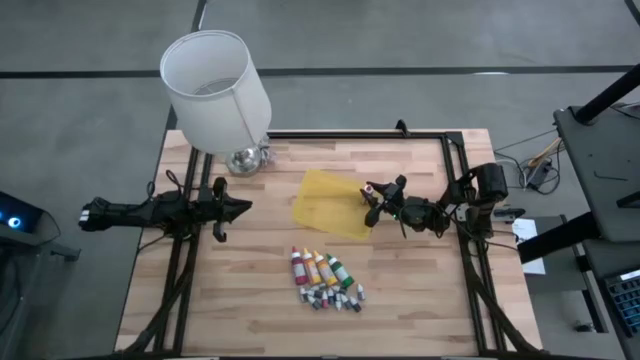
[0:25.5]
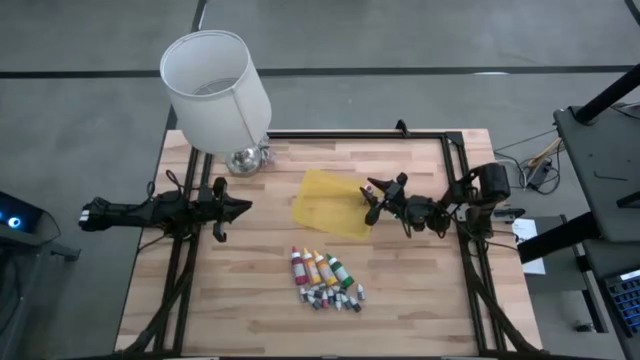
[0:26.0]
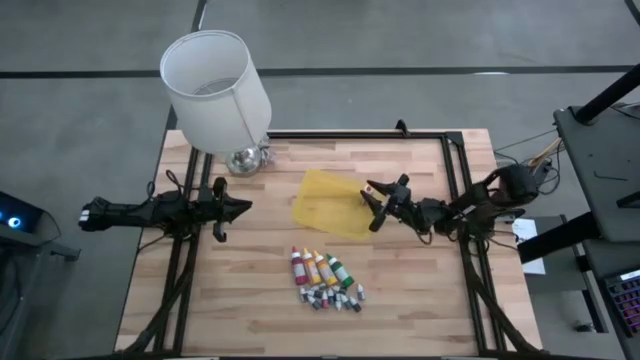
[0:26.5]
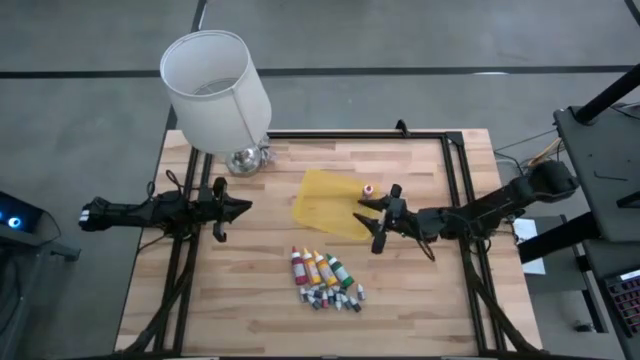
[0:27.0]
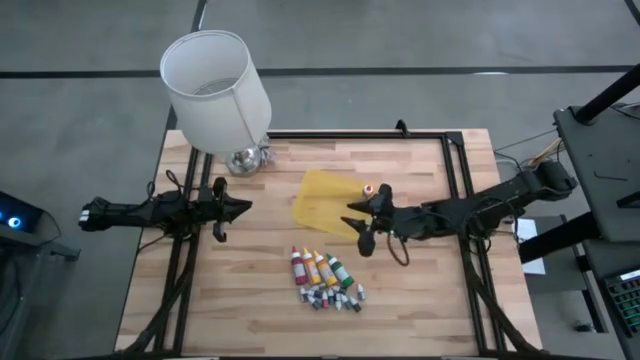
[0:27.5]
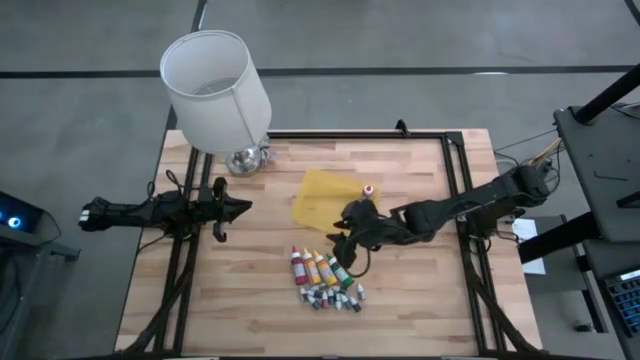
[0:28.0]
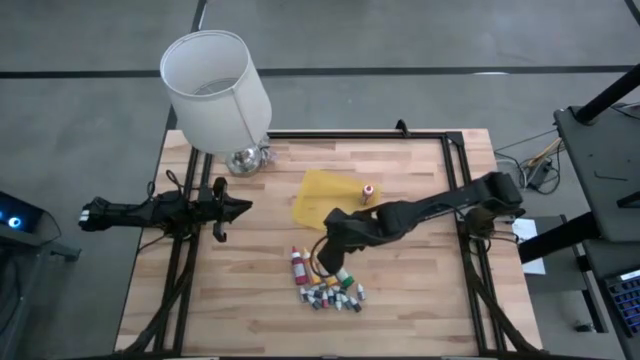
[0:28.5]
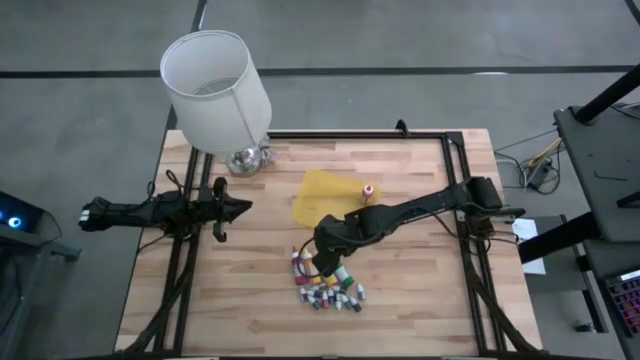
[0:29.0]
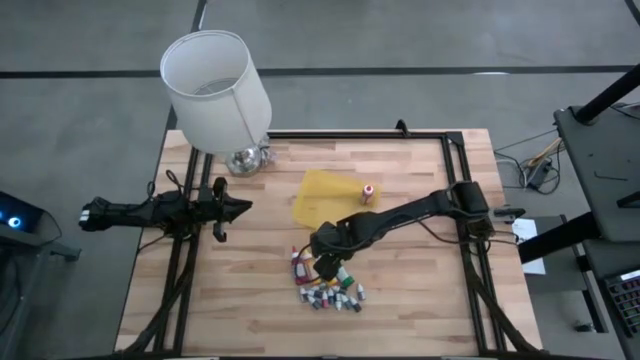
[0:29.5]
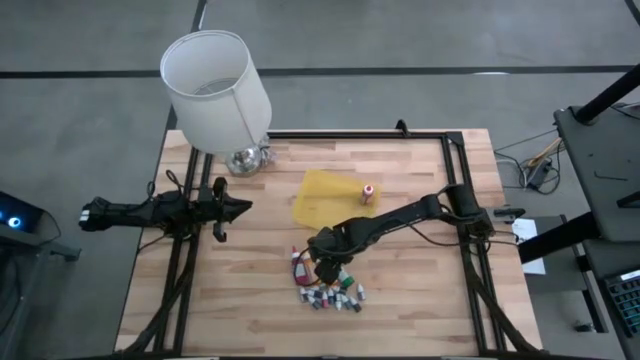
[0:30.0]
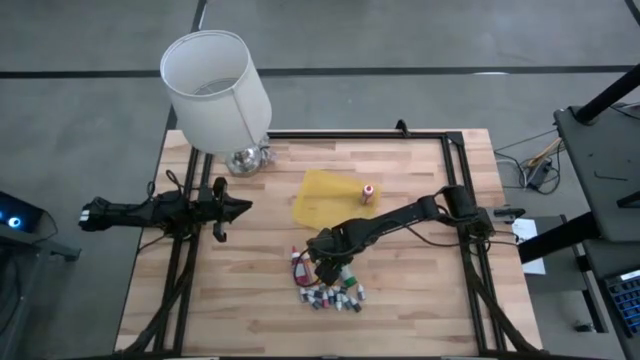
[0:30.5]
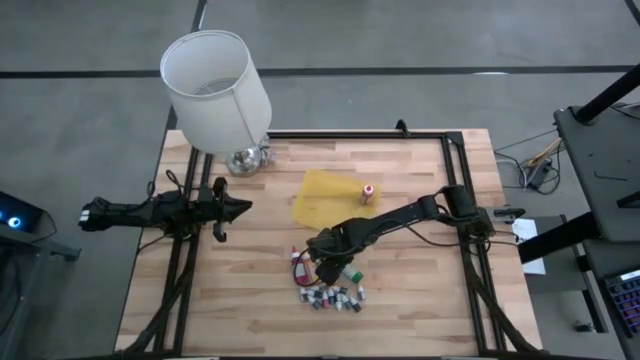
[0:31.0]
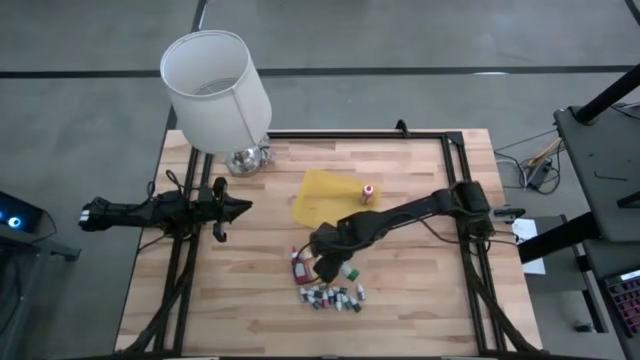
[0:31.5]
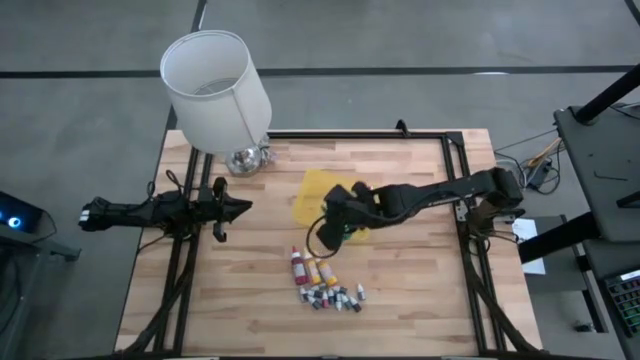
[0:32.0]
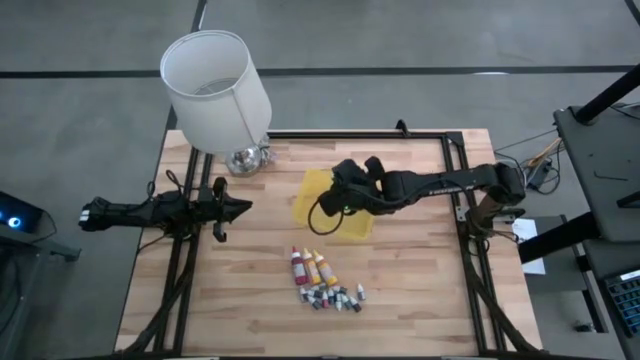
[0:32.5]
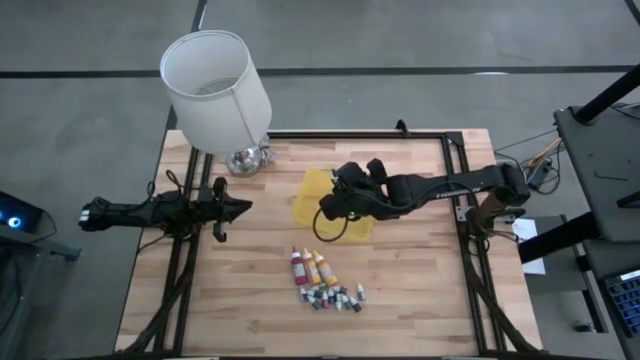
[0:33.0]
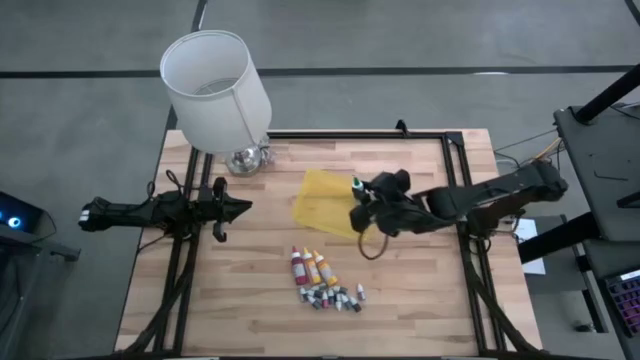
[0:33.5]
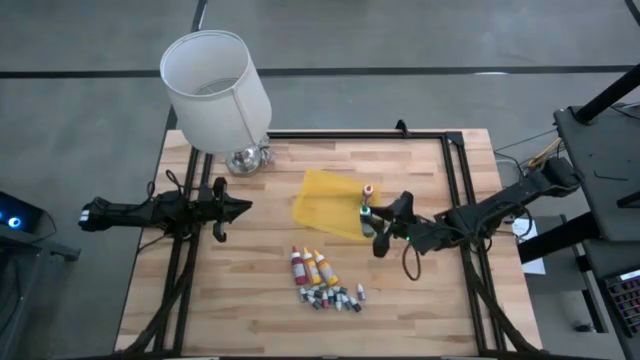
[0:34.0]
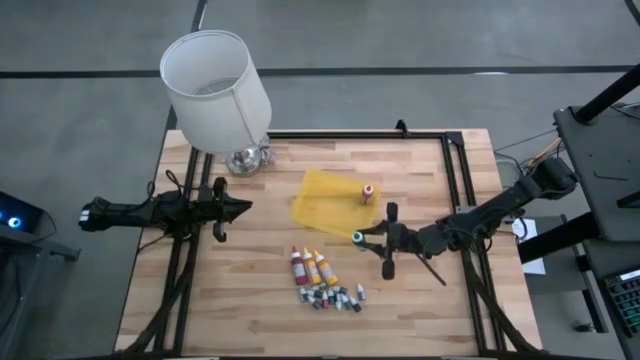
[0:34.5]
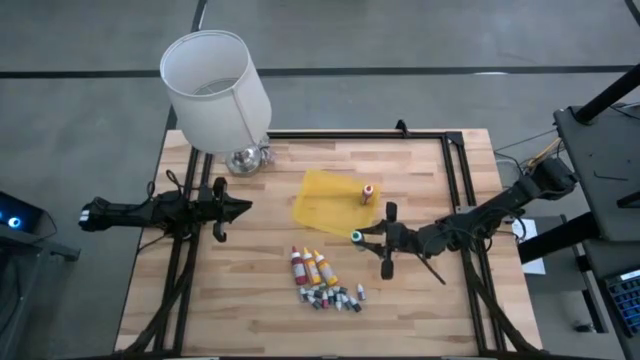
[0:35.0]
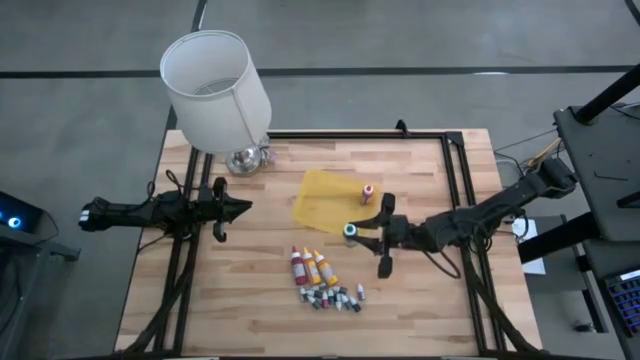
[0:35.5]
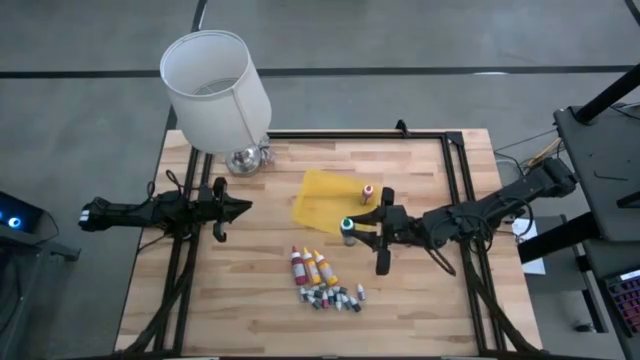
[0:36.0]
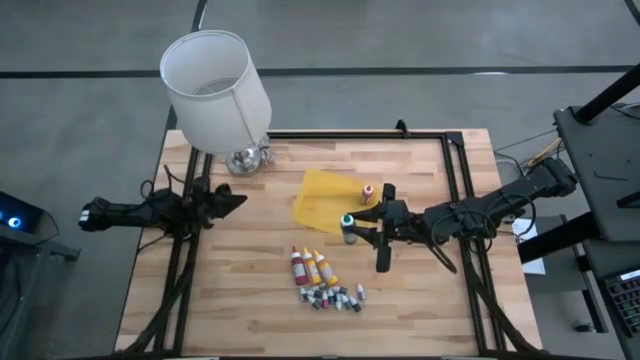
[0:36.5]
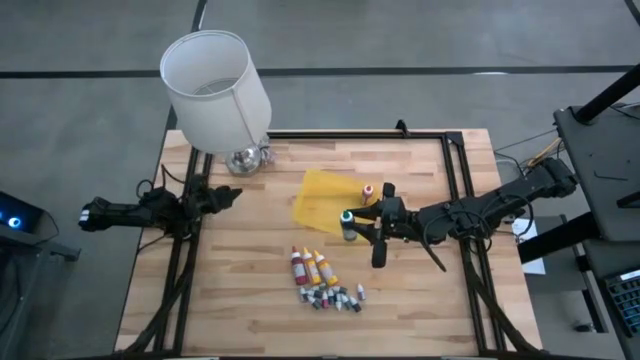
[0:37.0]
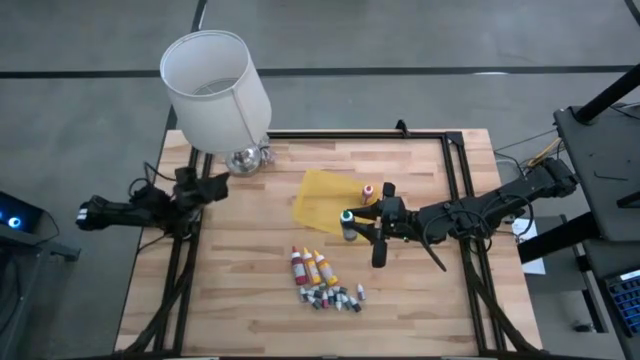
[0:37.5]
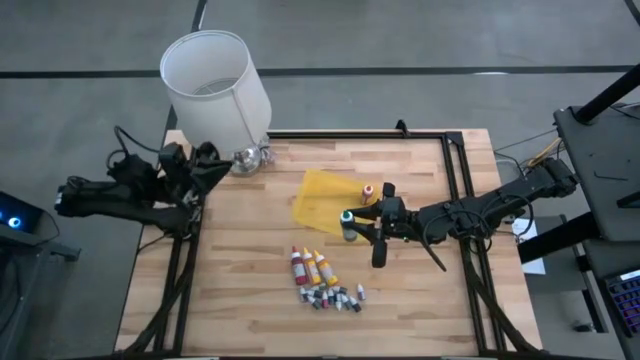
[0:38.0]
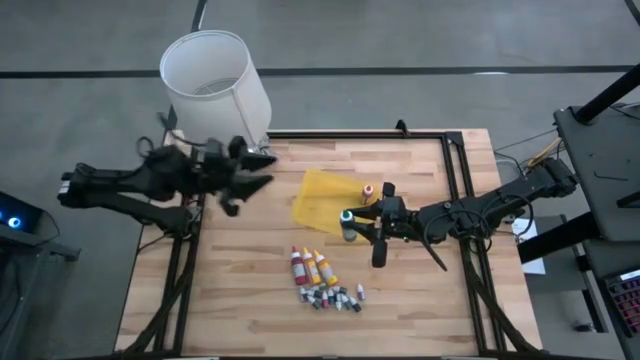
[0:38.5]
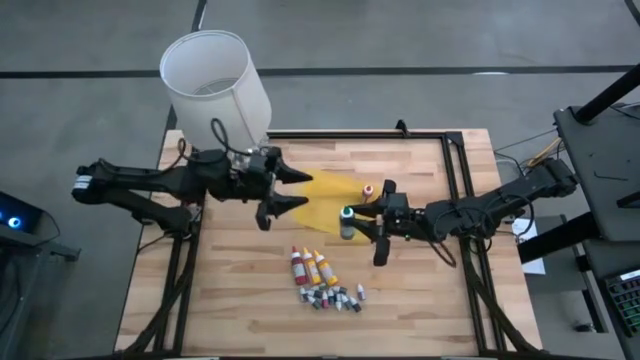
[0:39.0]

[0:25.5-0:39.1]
Task: Pick & Place food coloring
Put the large green food coloring bottle into the yellow bin

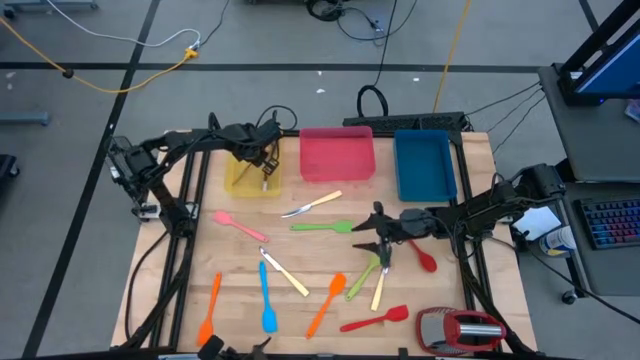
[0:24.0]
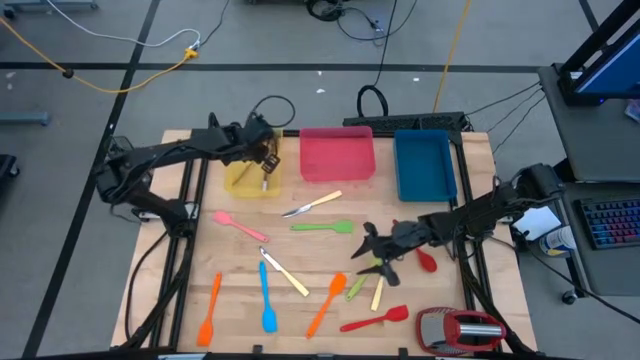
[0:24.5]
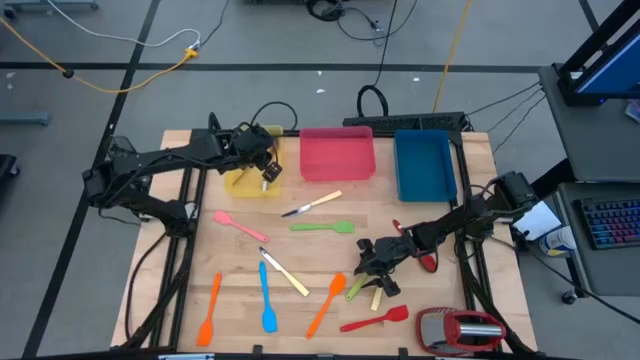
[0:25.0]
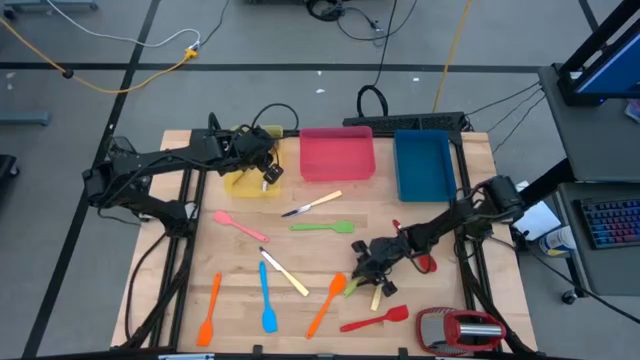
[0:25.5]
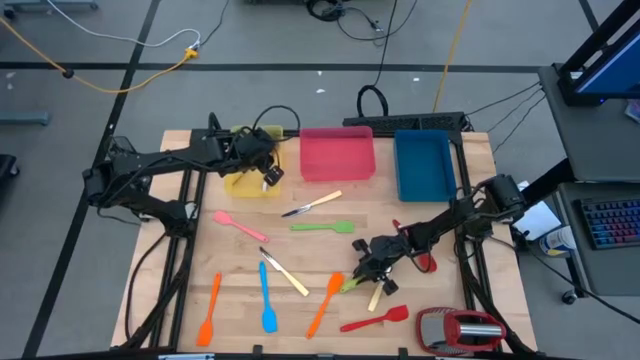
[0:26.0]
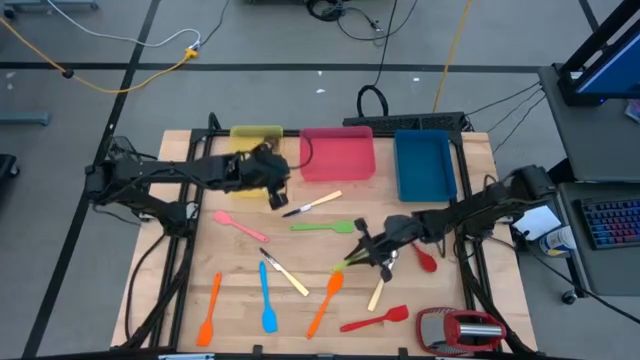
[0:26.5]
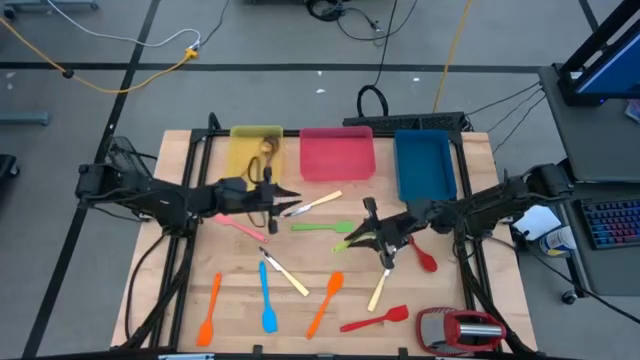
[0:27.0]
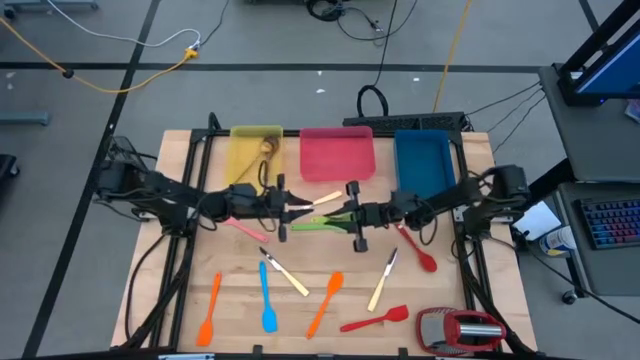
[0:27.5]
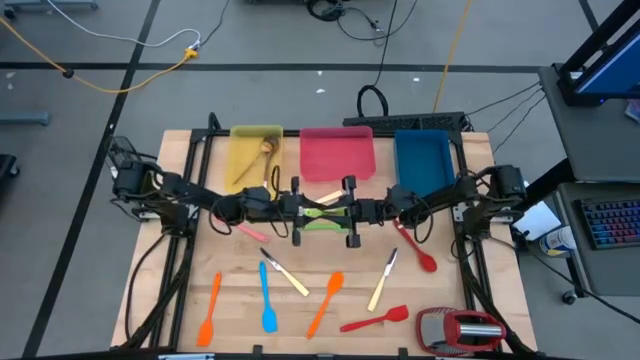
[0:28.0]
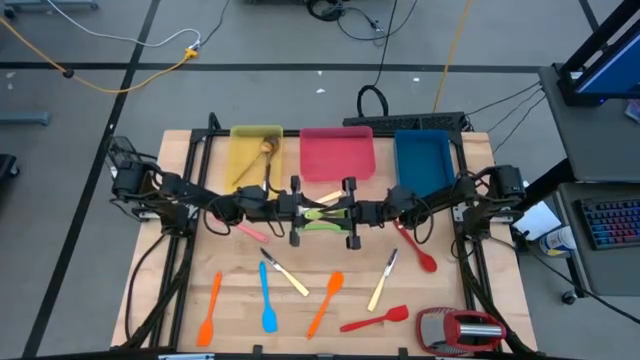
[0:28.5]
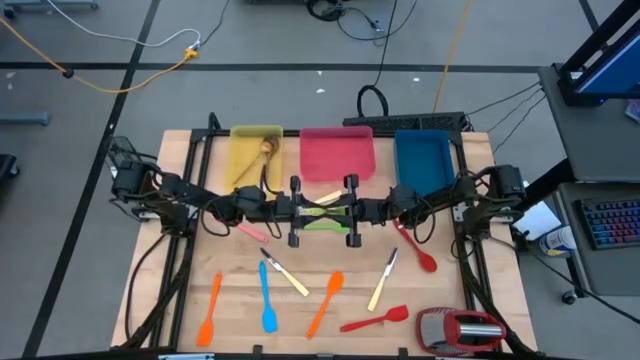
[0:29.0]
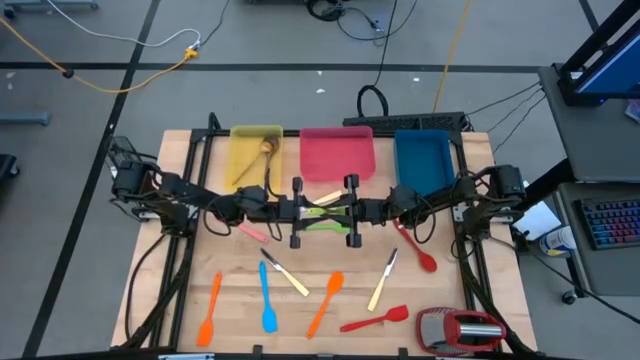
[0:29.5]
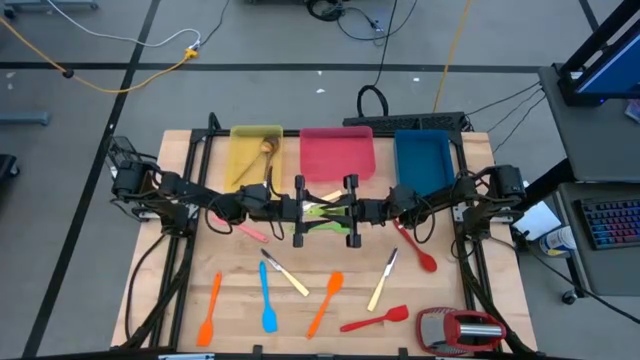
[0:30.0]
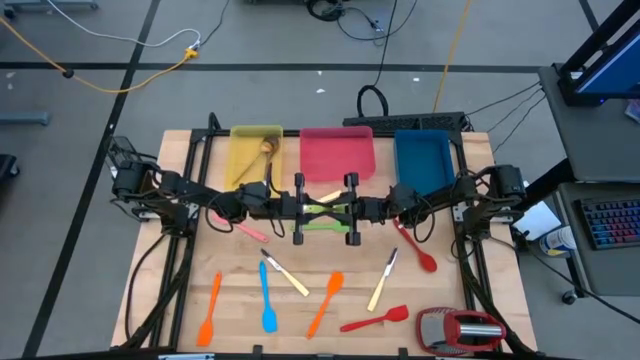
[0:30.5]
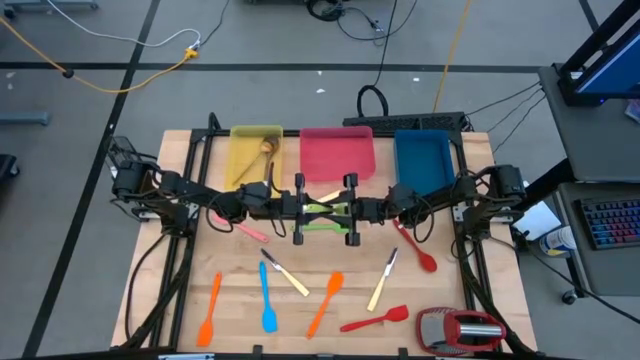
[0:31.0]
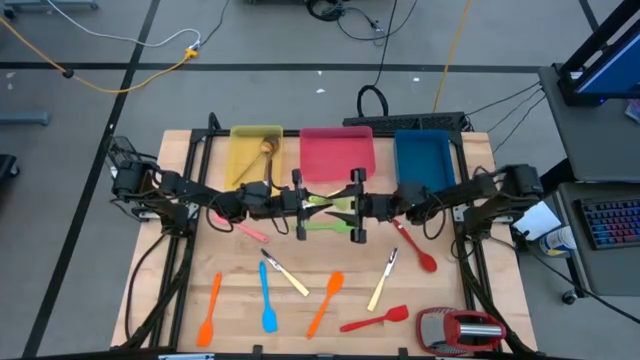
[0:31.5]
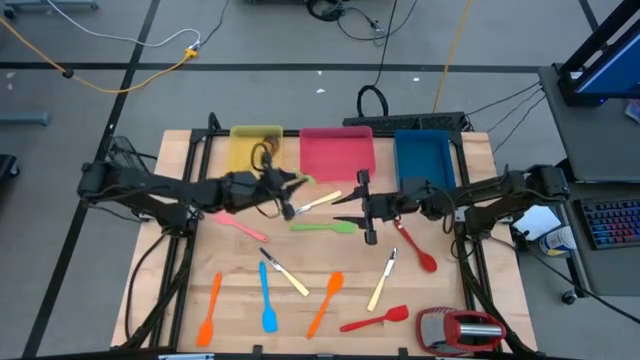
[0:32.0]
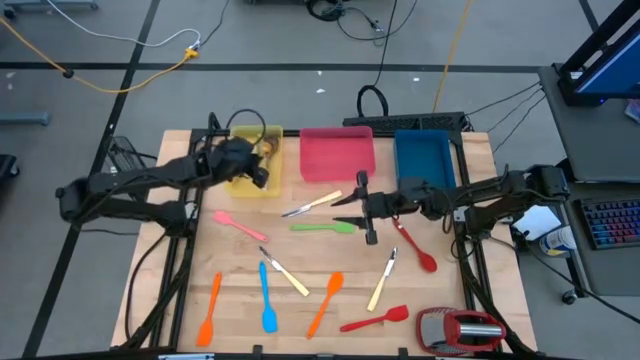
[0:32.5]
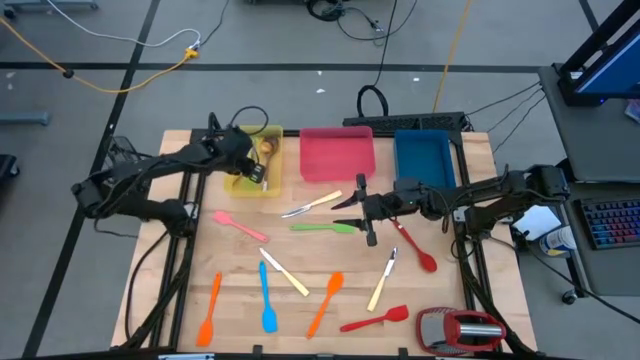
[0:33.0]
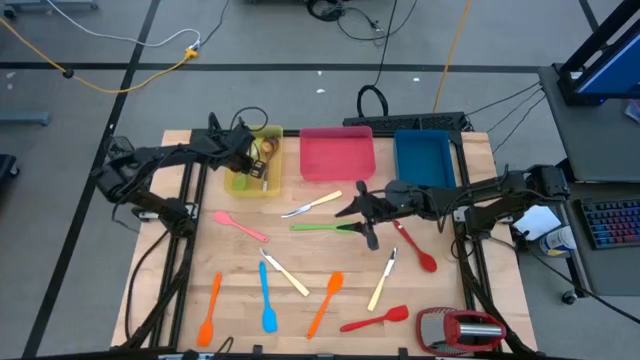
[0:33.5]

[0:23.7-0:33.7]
Task: Pick & Place Kitchen Items
Put the green serving spoon into the yellow bin
